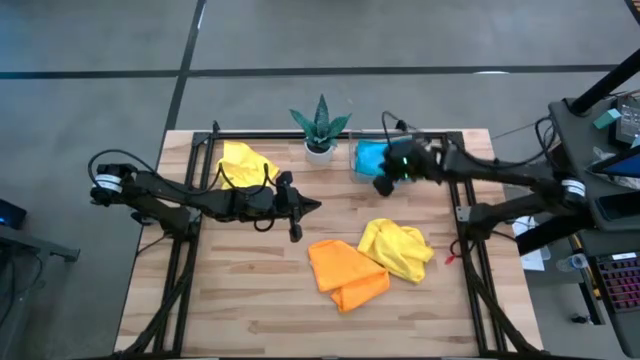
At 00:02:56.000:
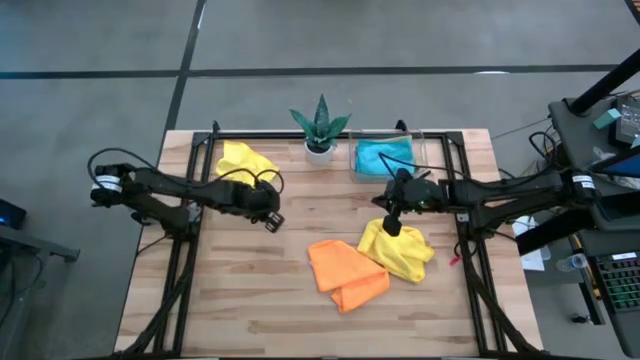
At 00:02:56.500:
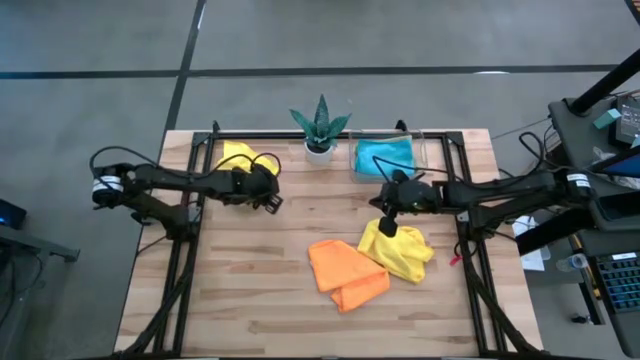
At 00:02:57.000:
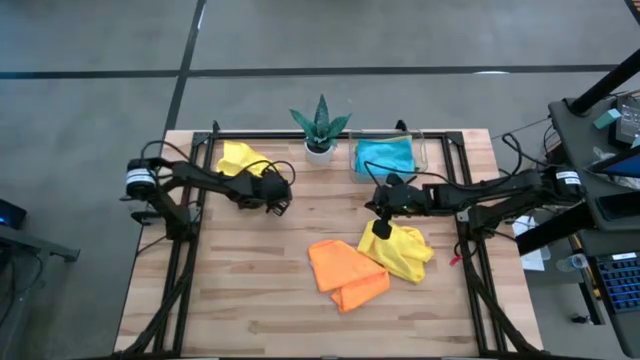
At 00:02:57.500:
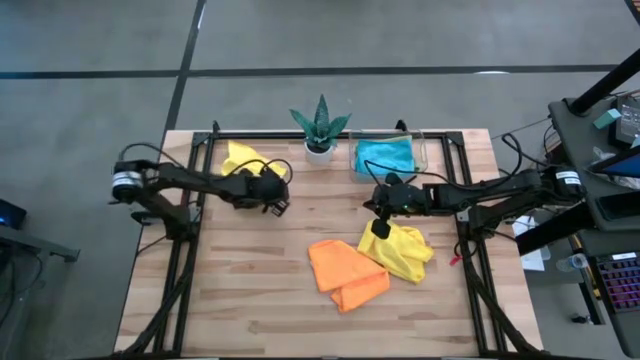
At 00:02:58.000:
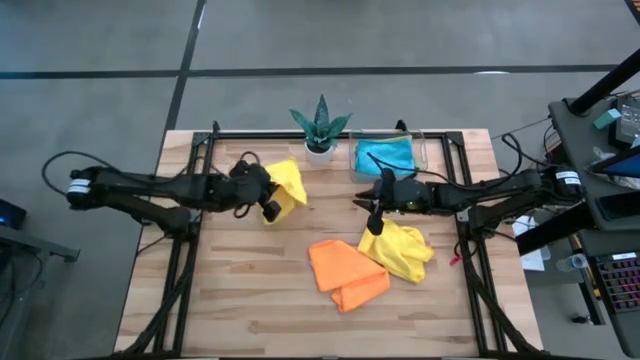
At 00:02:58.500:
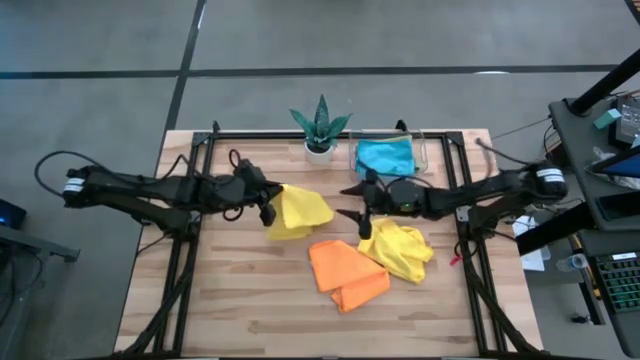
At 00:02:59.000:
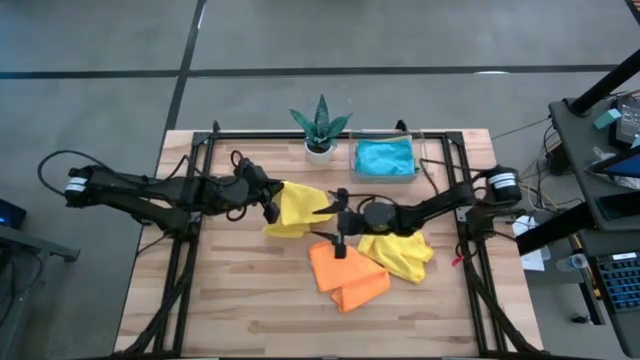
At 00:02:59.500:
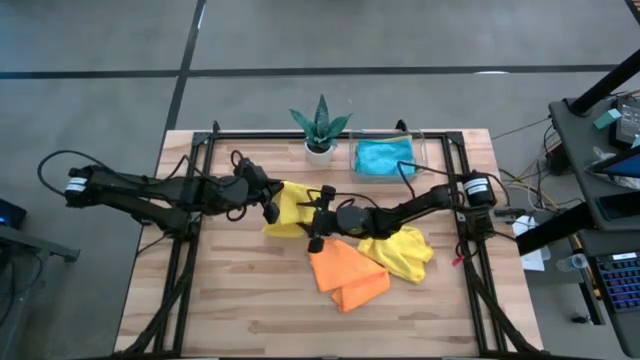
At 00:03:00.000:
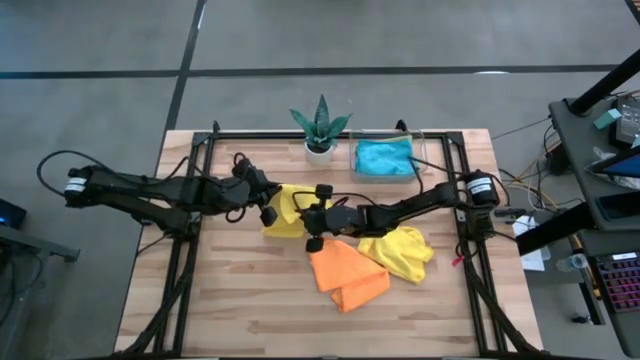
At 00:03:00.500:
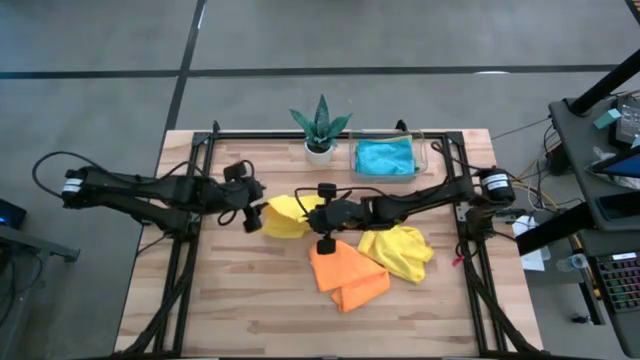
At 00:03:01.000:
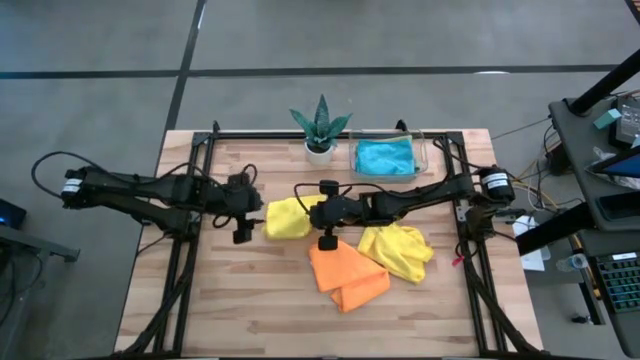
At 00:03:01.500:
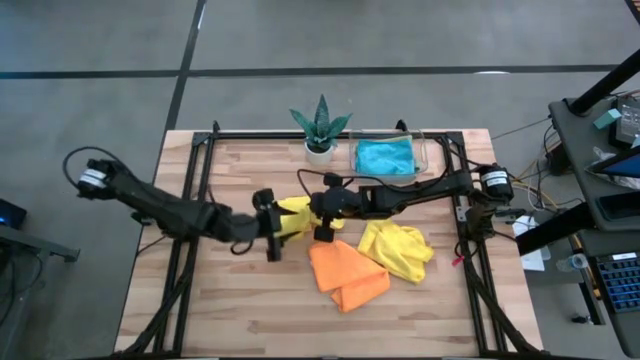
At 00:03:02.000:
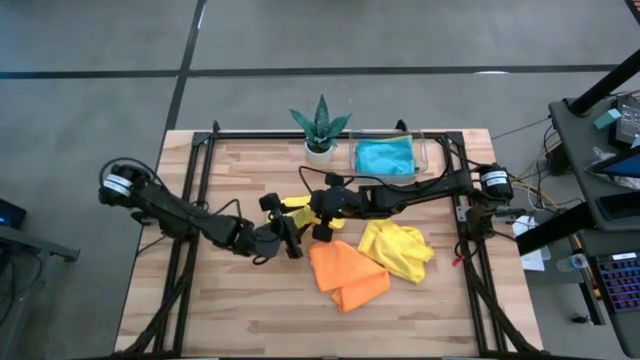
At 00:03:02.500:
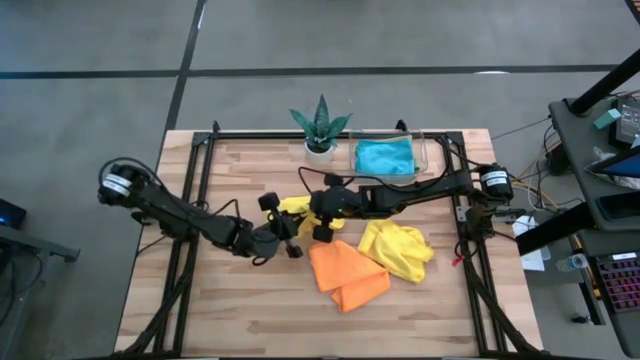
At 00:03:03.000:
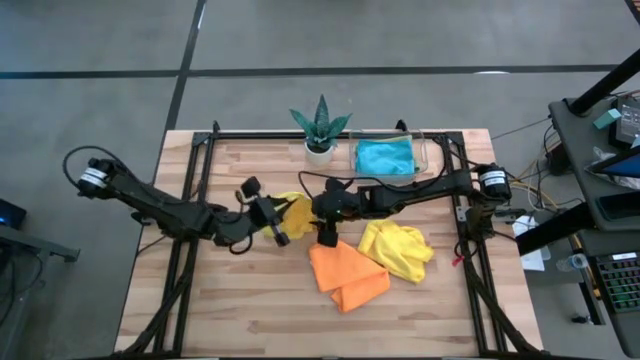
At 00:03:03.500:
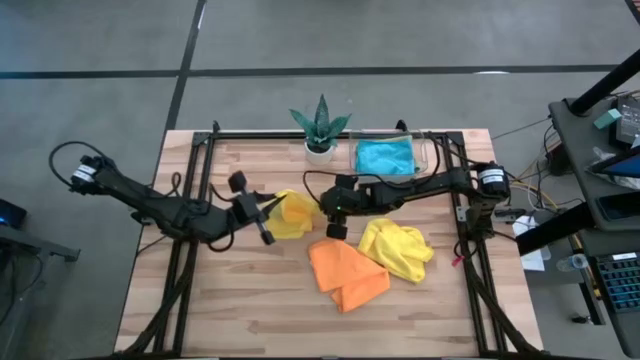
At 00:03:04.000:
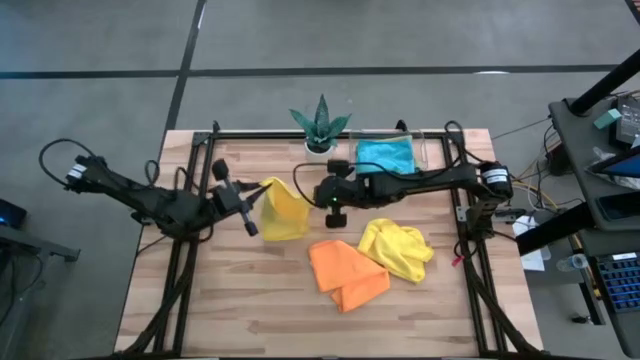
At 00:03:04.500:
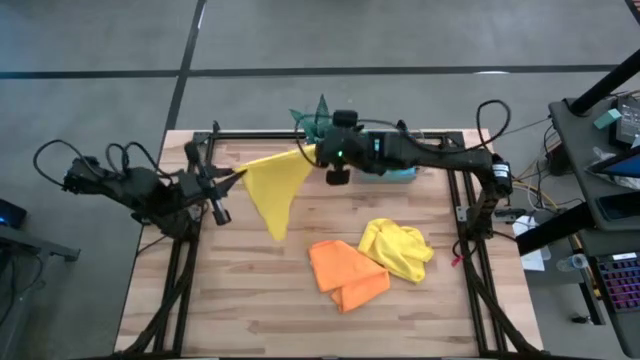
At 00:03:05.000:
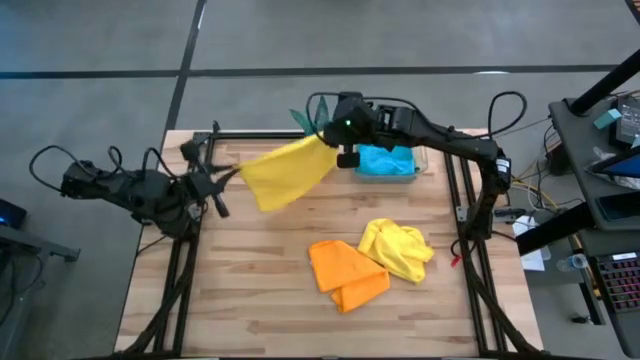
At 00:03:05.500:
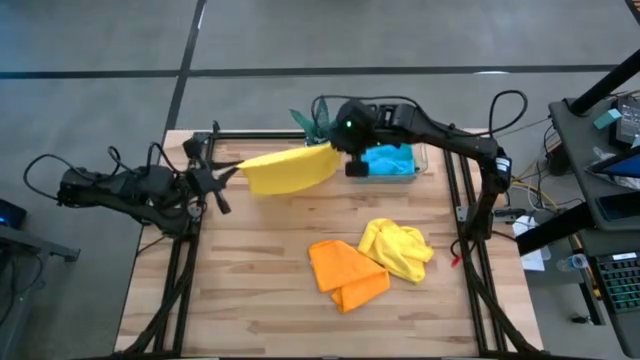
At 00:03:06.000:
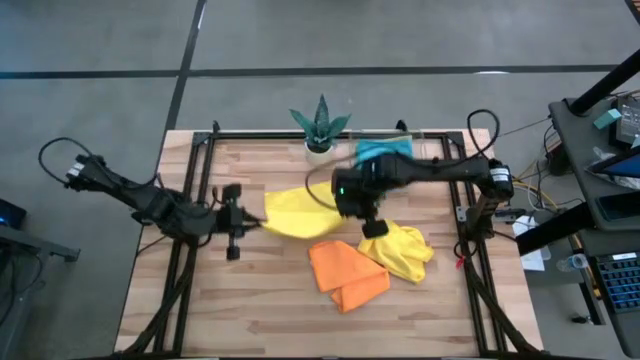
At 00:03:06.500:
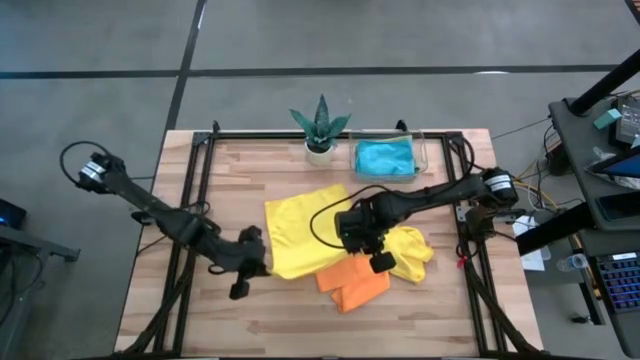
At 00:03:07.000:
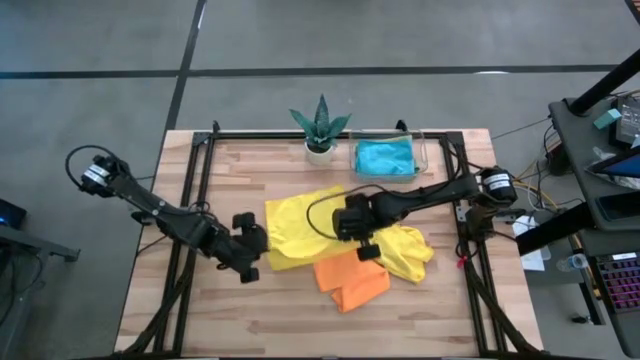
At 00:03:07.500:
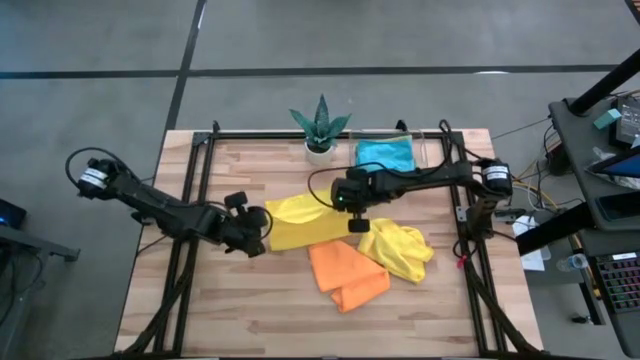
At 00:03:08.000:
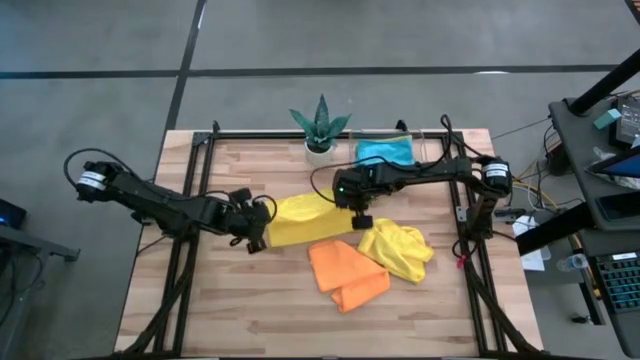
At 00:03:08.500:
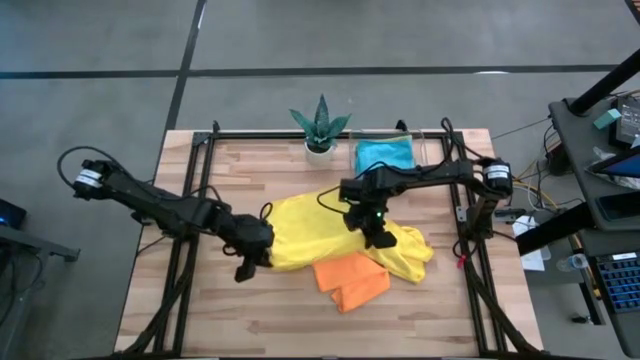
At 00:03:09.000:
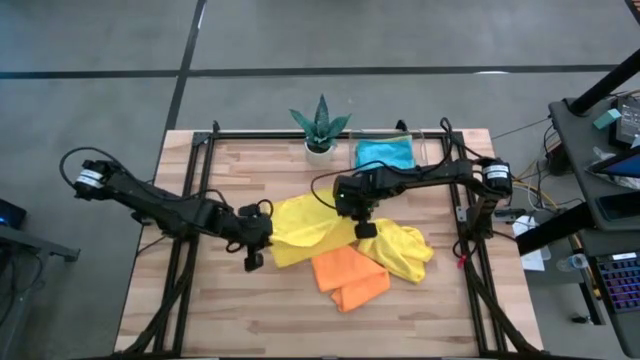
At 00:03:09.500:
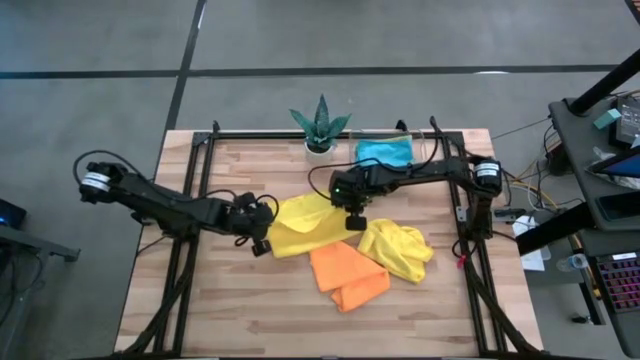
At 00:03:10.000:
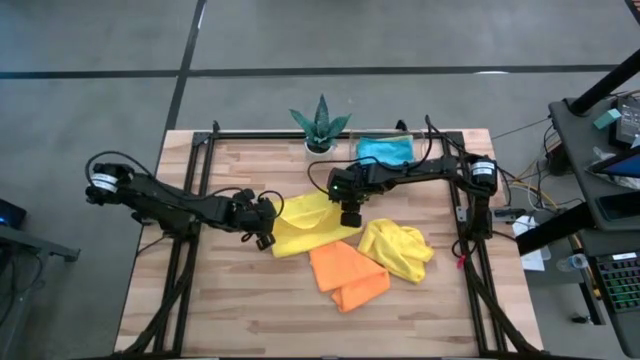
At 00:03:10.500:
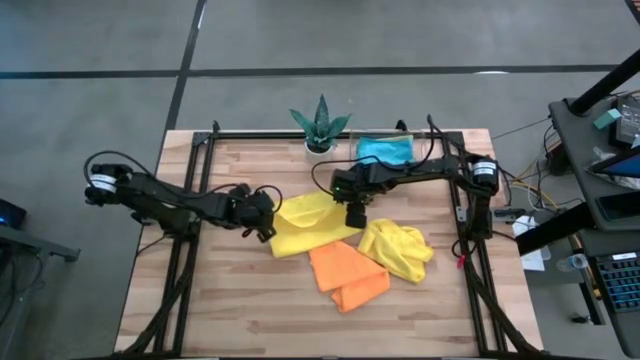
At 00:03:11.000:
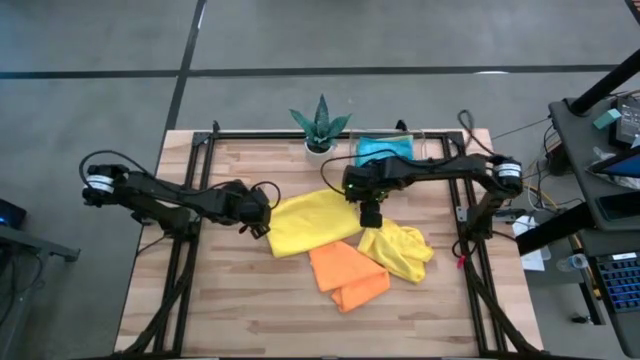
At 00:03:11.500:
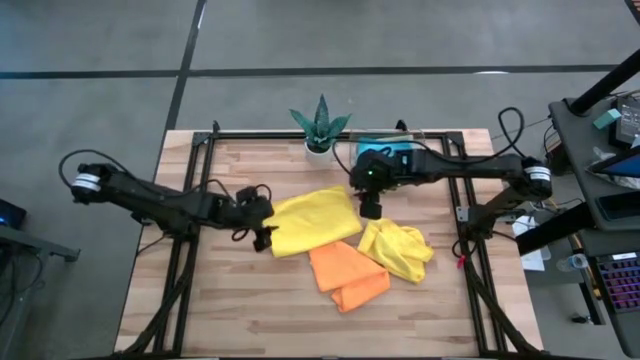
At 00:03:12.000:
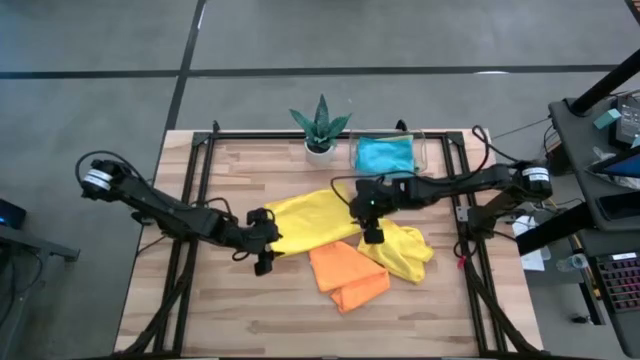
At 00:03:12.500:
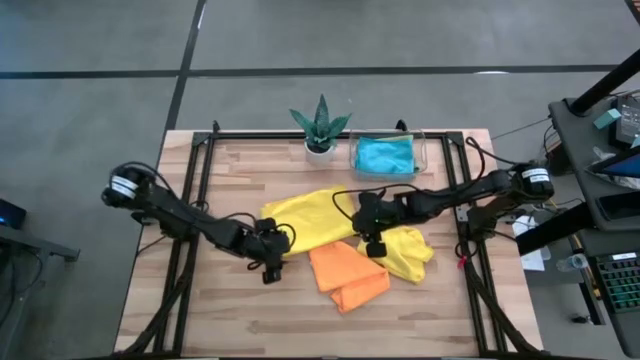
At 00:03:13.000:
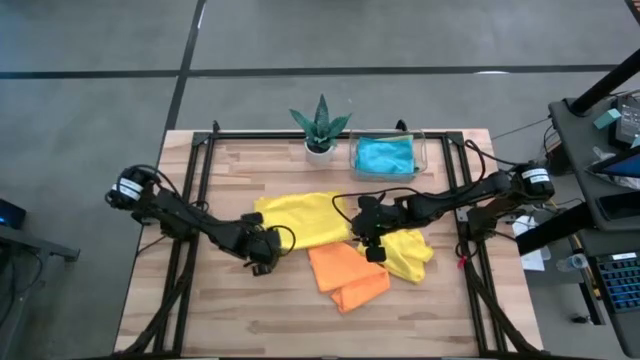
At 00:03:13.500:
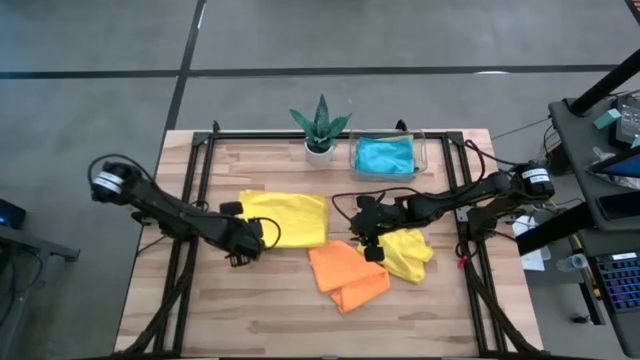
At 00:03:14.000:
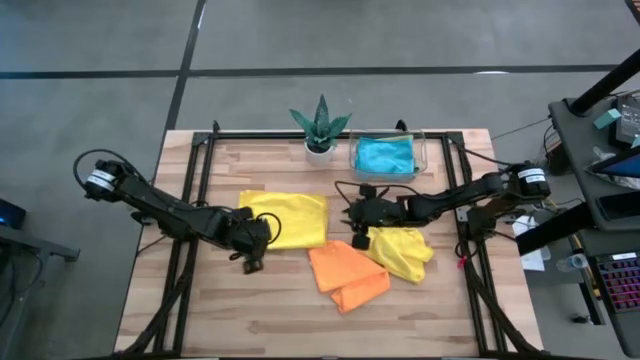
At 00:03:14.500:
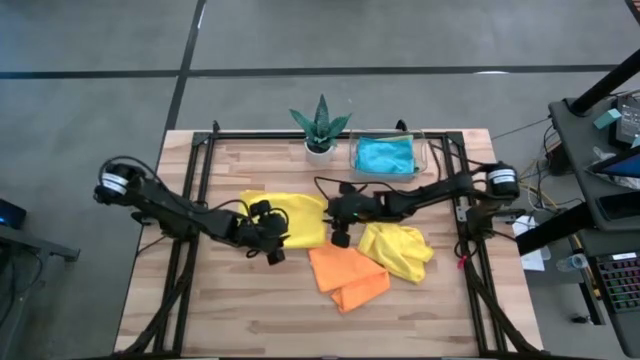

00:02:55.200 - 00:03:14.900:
Task: Fold microfiber towels
Fold the left yellow microfiber towel
